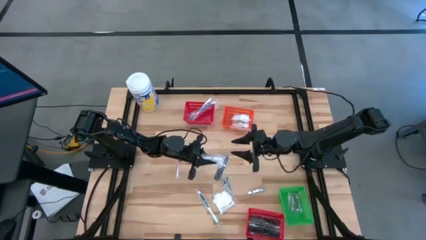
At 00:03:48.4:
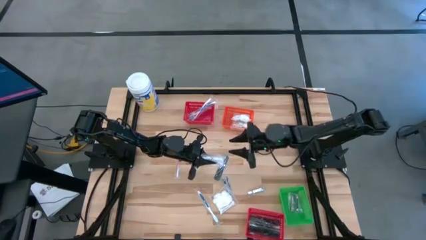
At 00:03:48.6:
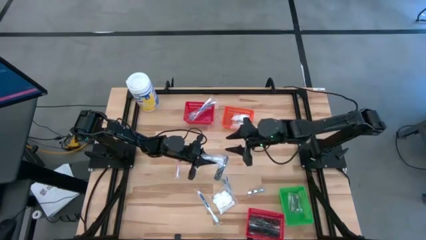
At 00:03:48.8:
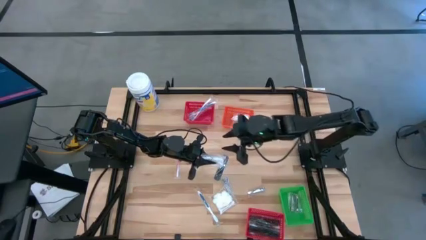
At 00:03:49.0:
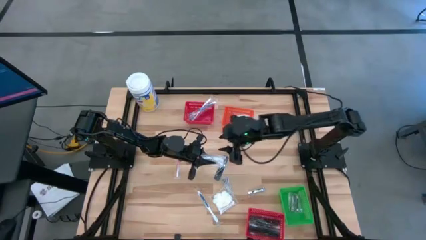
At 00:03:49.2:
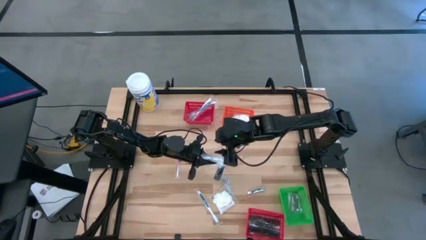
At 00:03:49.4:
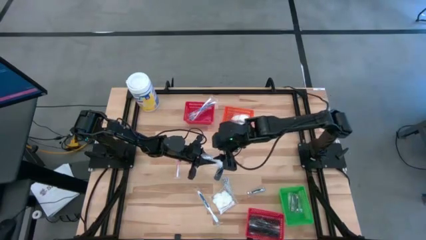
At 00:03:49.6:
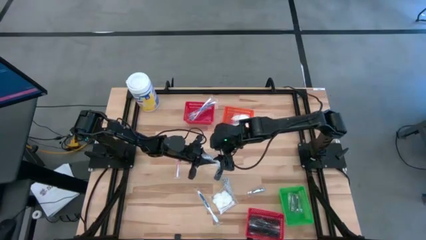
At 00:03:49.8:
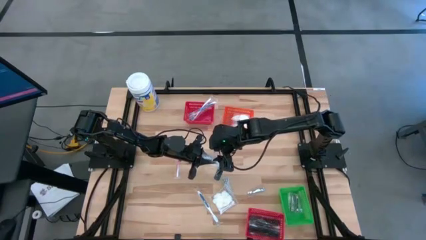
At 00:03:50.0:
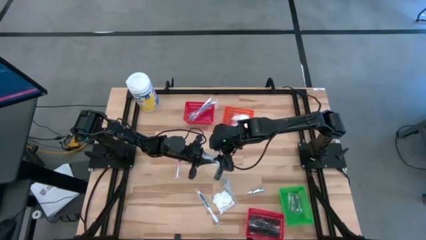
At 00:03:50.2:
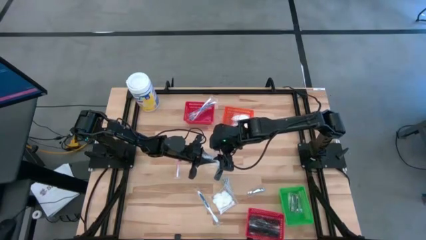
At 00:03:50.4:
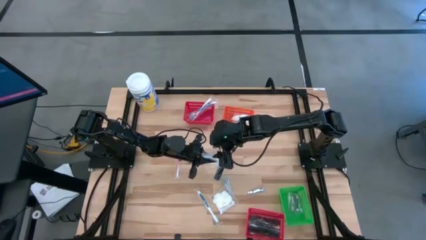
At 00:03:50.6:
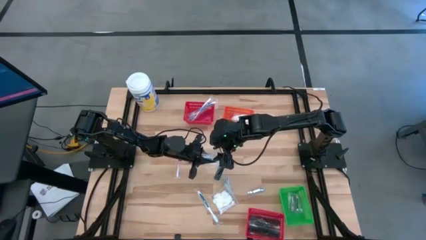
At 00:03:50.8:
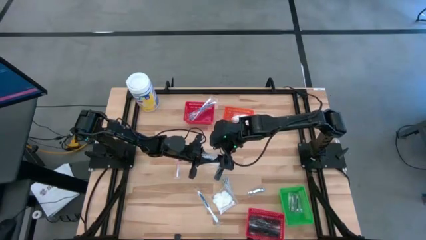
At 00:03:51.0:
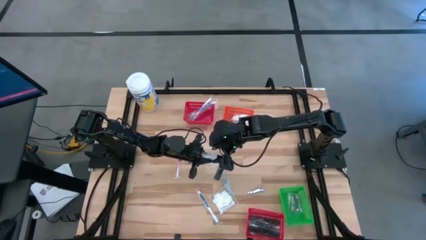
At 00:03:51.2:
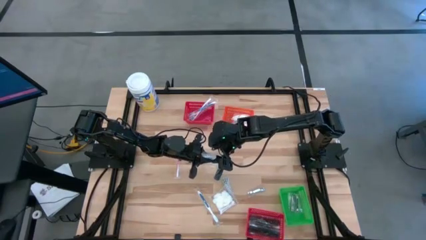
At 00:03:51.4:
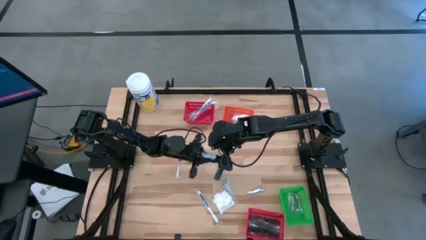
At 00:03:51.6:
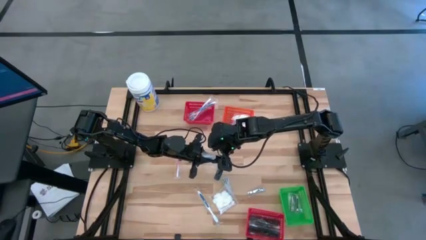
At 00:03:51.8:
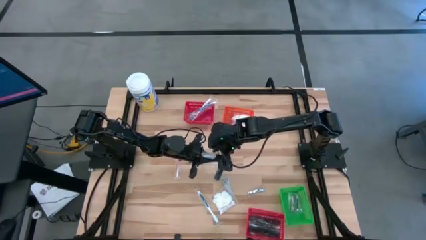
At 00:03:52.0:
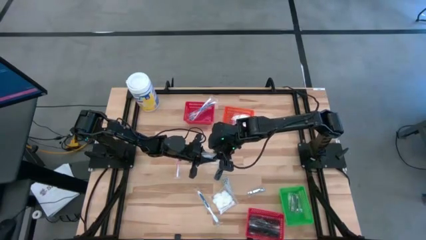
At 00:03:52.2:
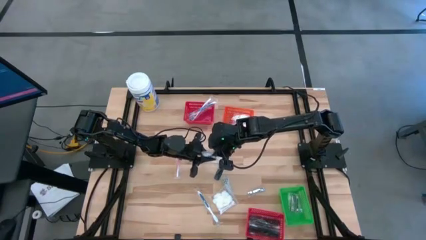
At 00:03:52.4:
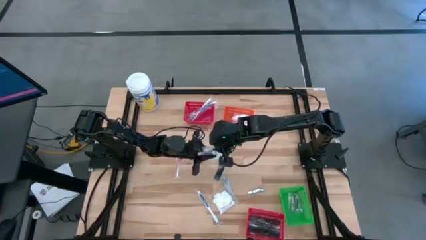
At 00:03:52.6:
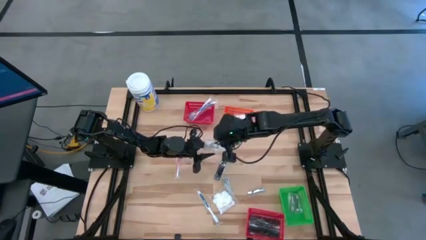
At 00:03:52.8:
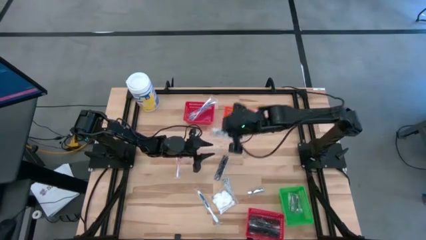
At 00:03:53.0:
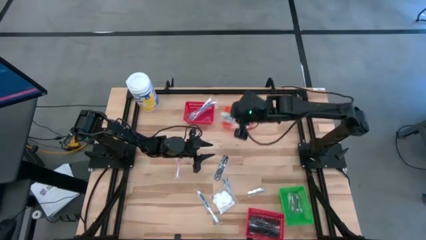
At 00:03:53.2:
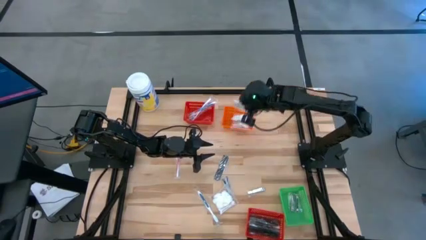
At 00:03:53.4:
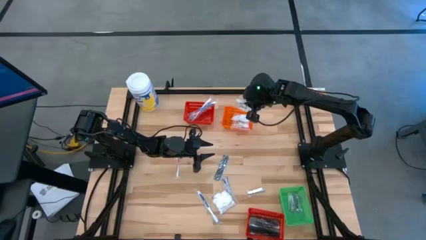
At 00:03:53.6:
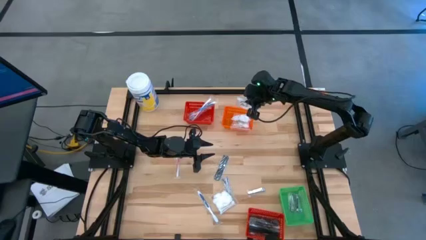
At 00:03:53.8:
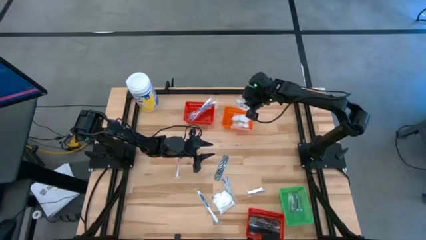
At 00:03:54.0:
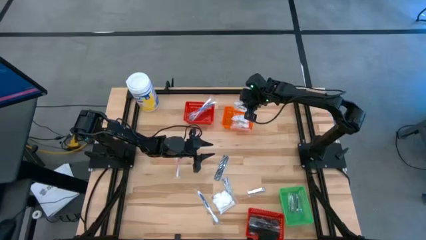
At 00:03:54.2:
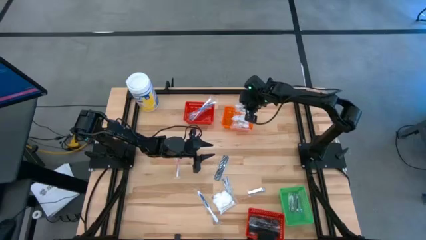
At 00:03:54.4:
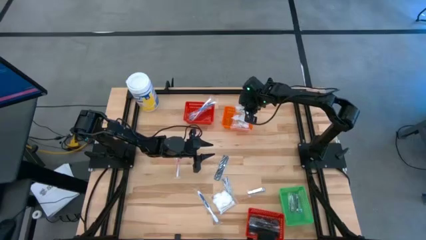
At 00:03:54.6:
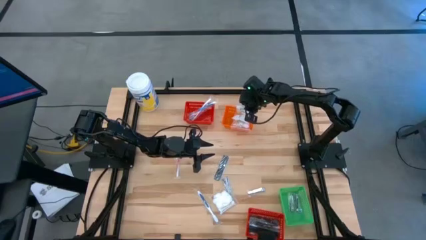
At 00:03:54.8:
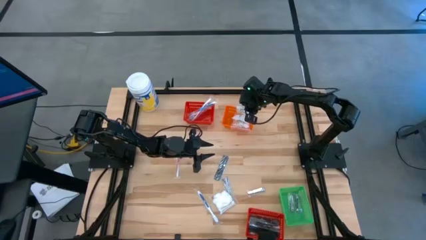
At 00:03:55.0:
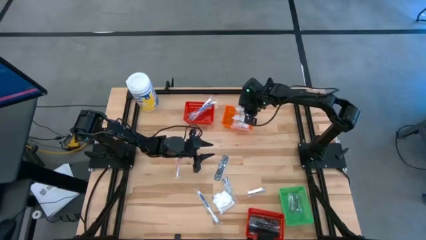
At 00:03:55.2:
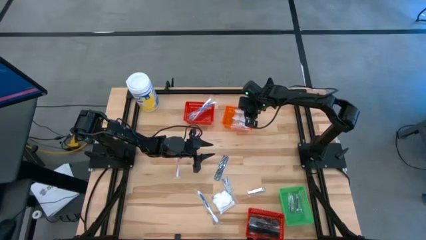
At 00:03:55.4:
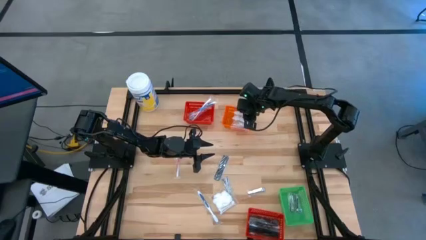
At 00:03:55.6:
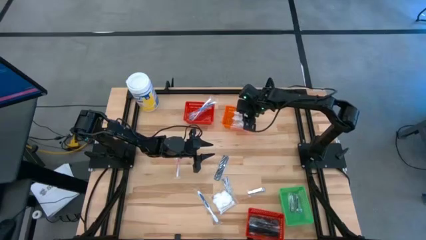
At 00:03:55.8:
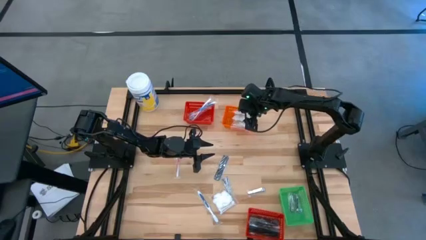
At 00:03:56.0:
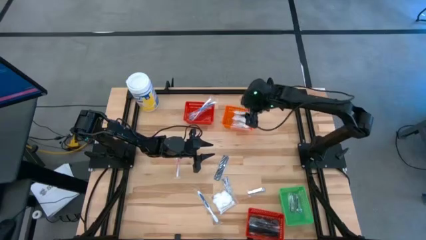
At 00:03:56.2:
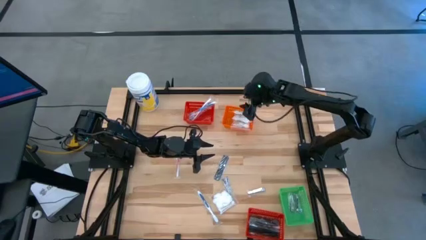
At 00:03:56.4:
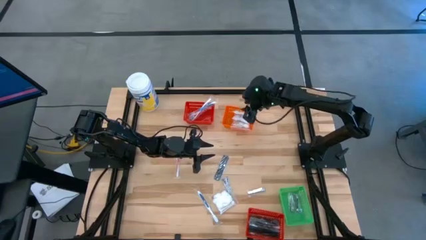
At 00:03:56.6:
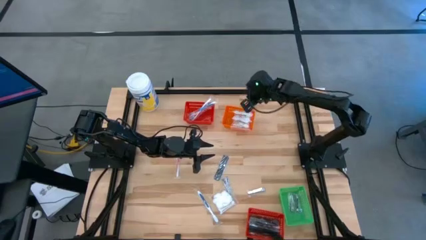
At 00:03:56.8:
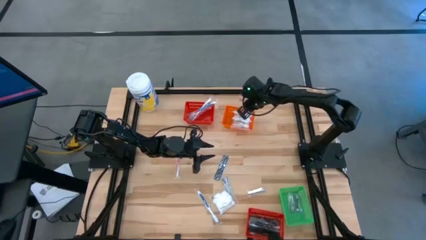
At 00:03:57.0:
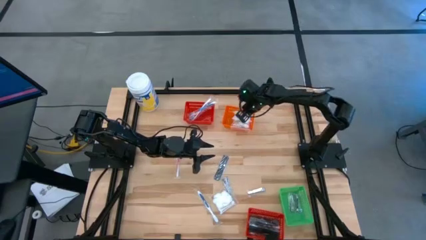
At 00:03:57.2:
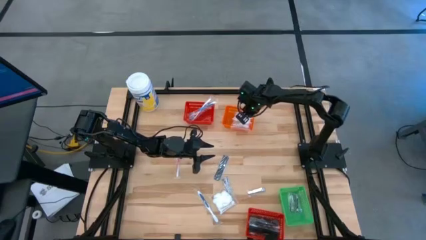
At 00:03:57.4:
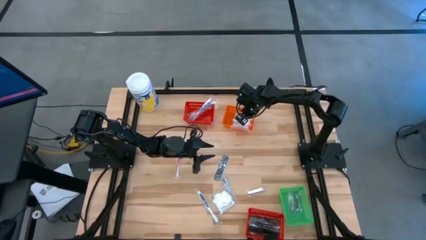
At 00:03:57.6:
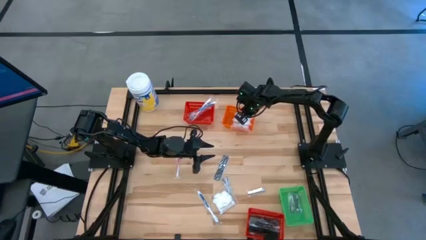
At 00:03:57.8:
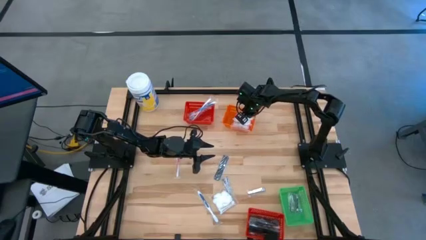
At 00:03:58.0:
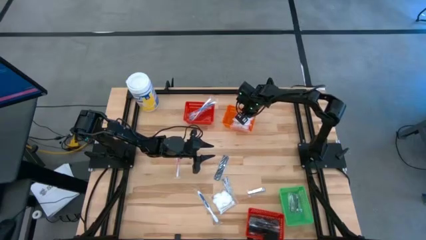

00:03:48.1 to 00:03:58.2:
Task: Pick & Place Travel size toiletries
Put the white cotton pack into the orange bin

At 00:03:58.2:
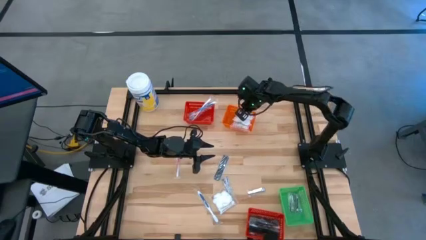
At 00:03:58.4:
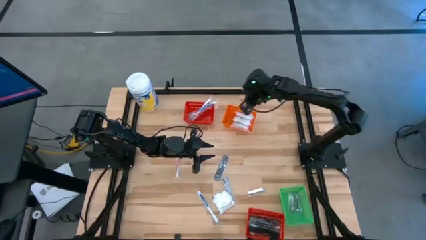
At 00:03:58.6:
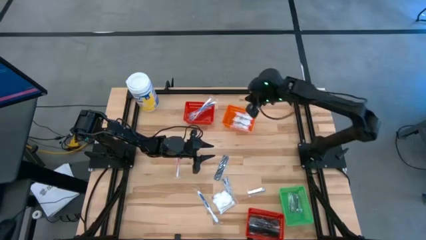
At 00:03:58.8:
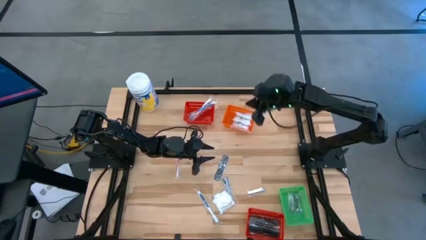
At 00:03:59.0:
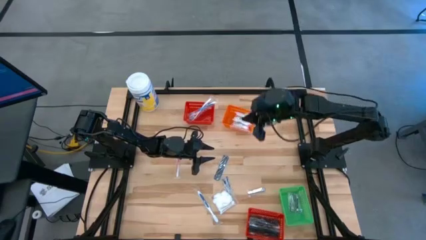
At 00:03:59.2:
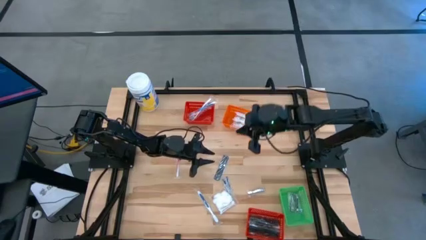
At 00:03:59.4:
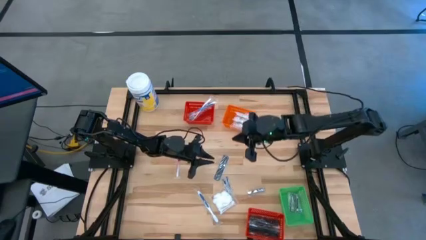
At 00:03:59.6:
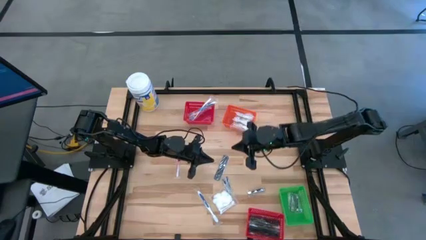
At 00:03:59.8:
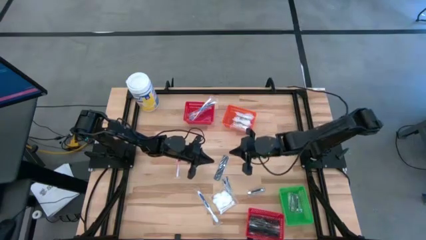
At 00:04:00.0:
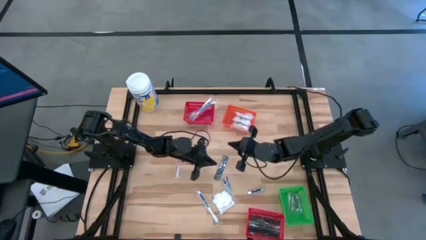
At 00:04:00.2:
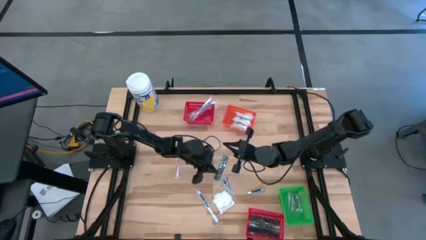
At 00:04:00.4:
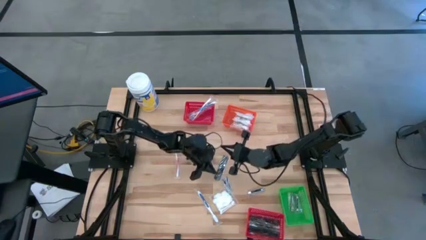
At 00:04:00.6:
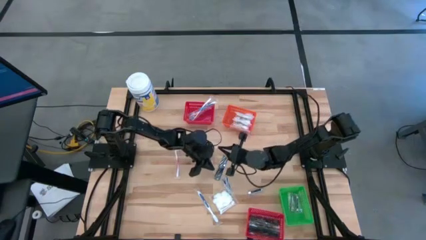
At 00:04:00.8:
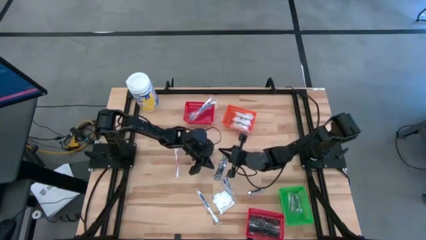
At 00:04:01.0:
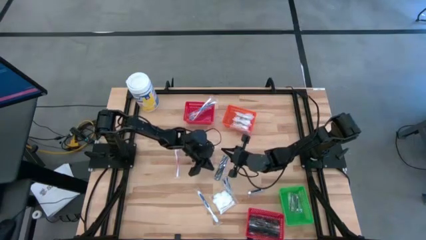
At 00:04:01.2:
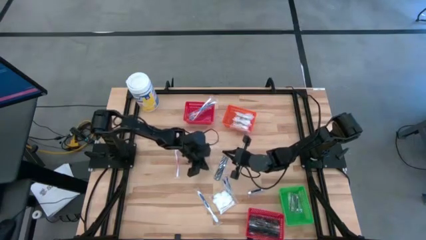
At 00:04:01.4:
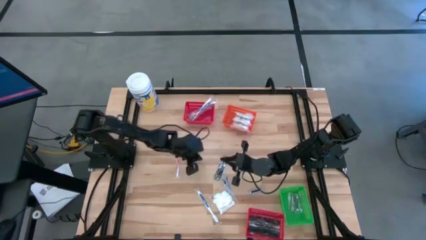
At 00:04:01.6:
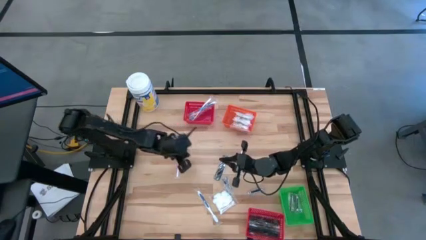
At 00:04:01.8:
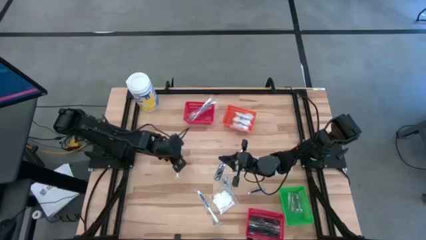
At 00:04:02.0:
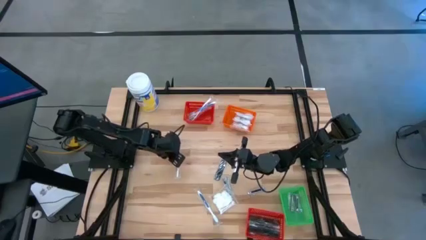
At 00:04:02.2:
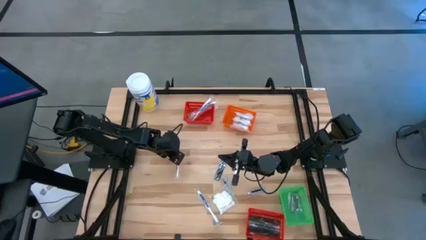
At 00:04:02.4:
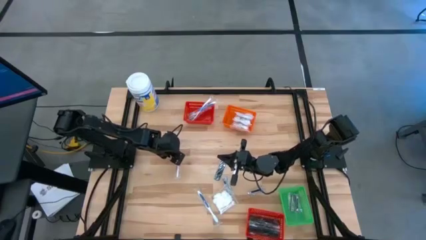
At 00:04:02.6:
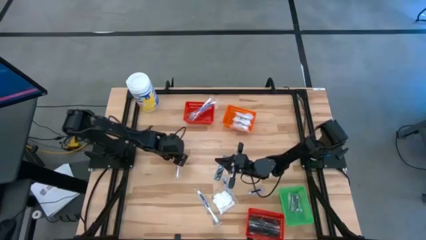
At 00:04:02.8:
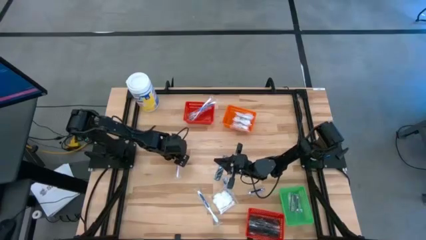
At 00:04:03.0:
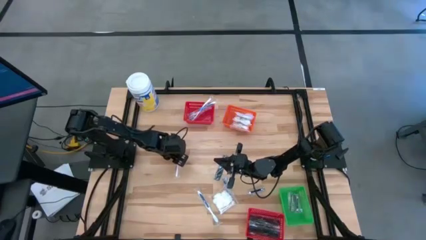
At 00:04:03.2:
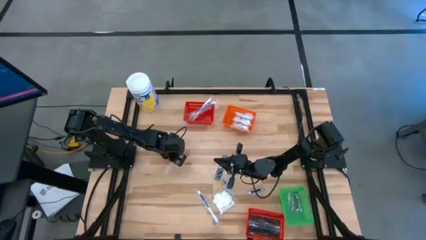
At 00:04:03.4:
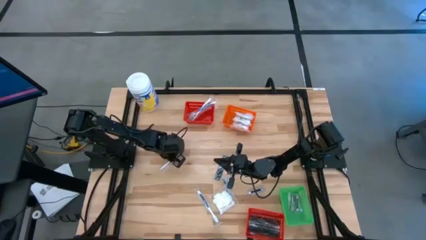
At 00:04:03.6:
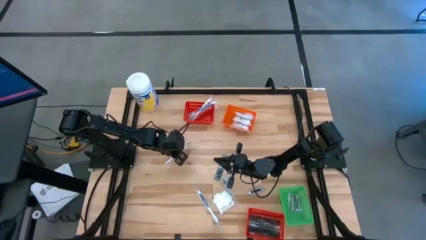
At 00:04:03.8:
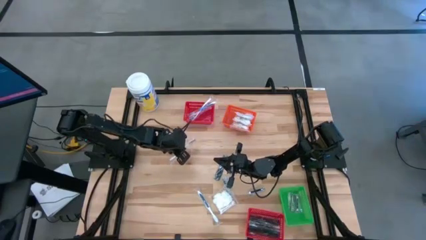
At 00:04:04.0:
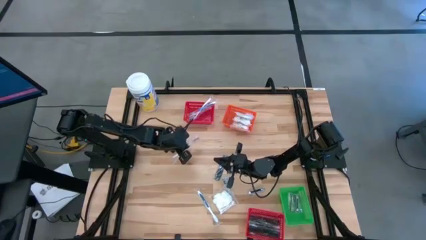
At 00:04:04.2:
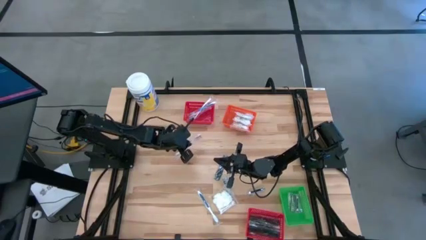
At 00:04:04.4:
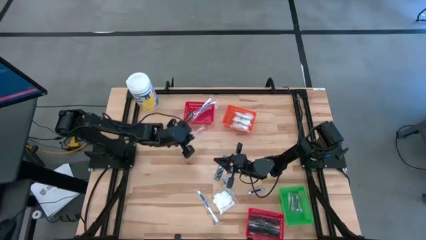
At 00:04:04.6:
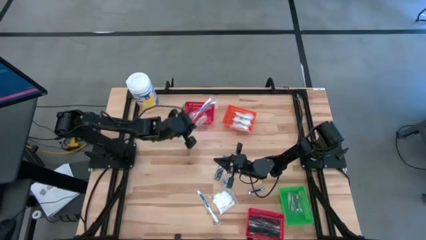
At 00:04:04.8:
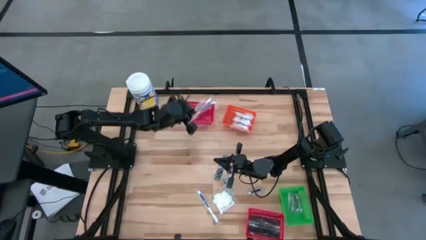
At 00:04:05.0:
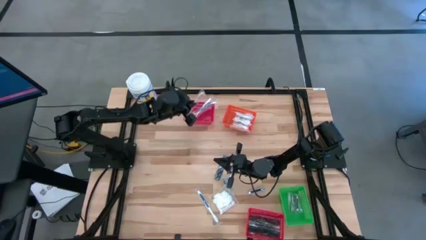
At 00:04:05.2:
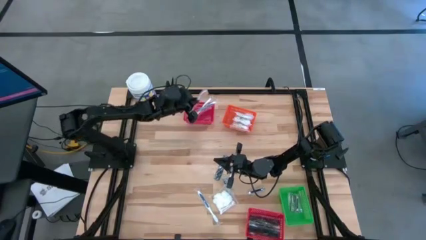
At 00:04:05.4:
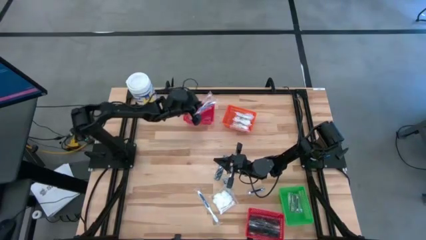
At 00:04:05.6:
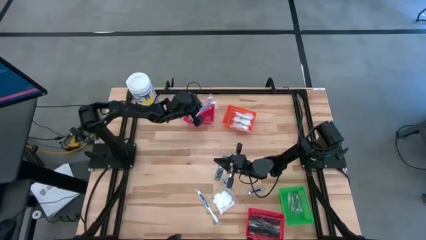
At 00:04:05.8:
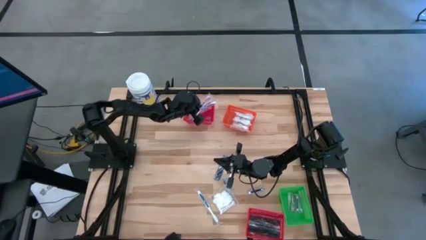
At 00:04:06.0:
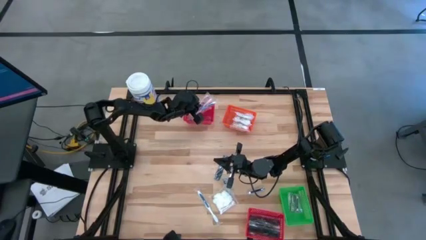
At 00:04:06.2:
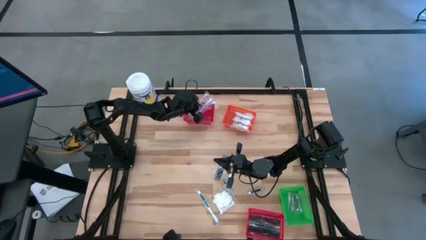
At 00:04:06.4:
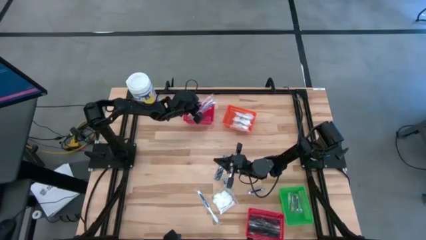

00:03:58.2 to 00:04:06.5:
Put the red toothbrush into the top red bin
